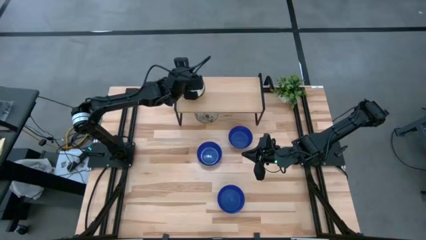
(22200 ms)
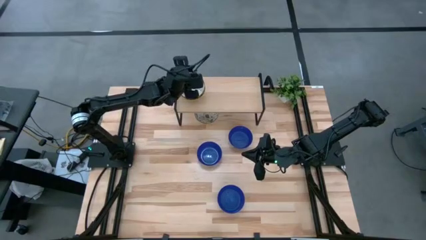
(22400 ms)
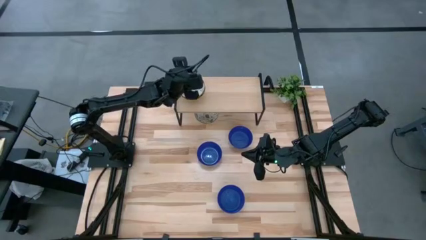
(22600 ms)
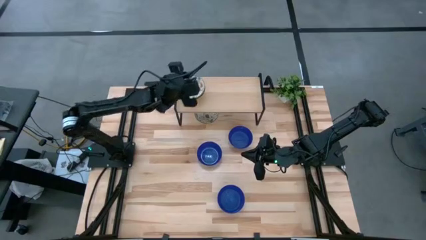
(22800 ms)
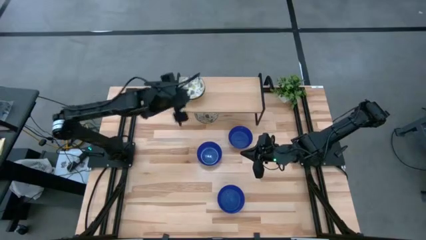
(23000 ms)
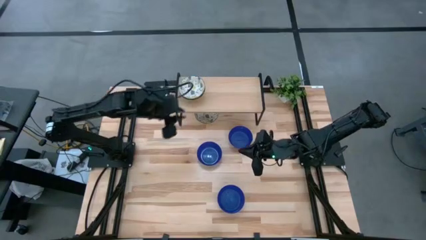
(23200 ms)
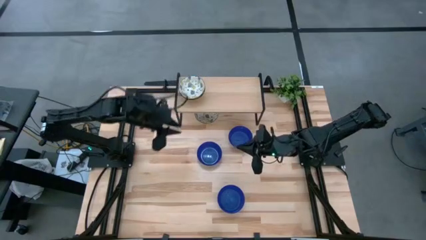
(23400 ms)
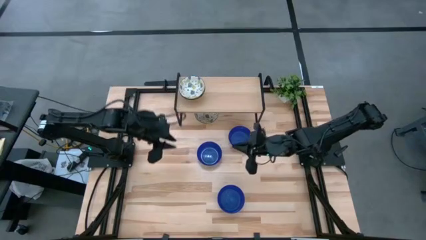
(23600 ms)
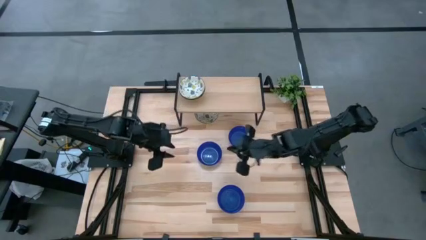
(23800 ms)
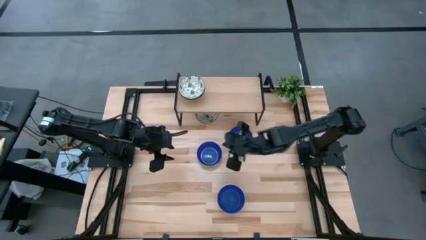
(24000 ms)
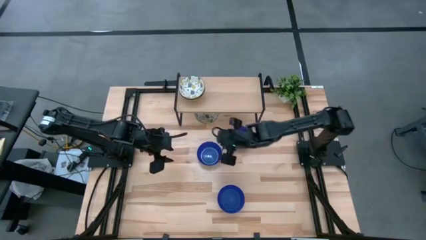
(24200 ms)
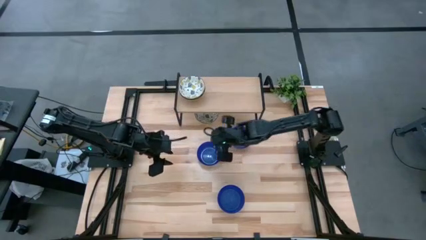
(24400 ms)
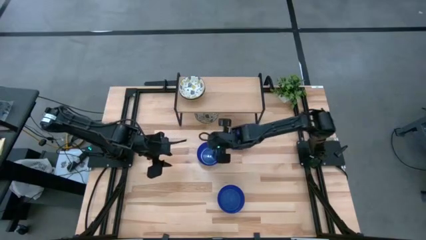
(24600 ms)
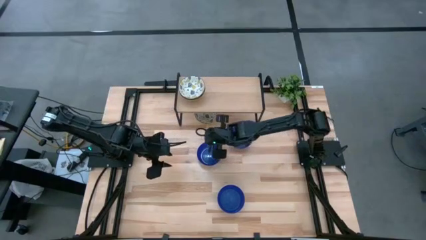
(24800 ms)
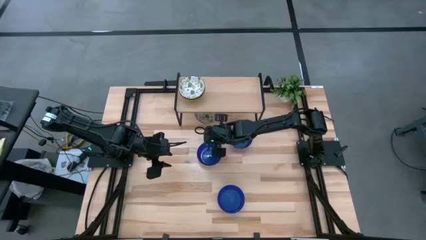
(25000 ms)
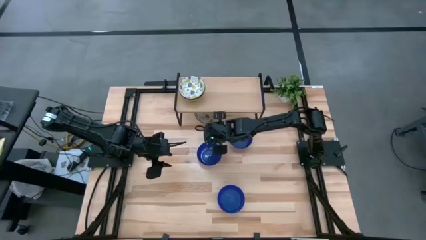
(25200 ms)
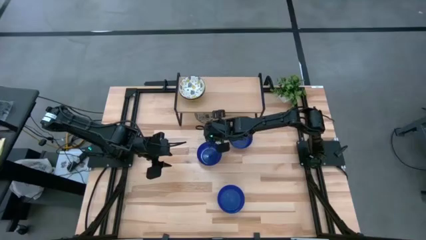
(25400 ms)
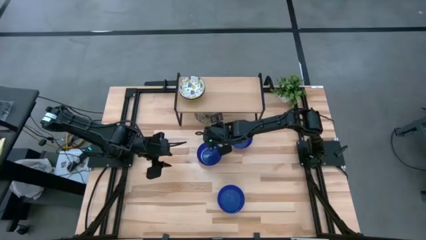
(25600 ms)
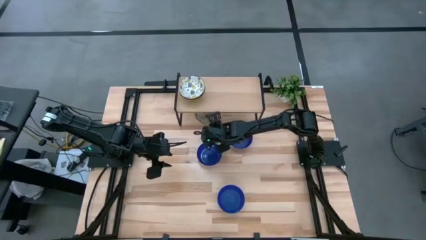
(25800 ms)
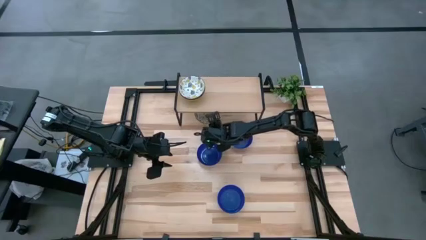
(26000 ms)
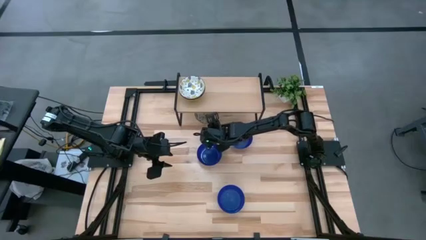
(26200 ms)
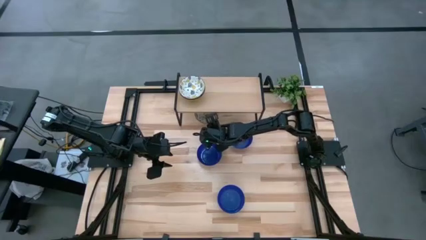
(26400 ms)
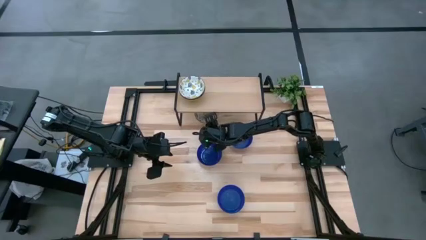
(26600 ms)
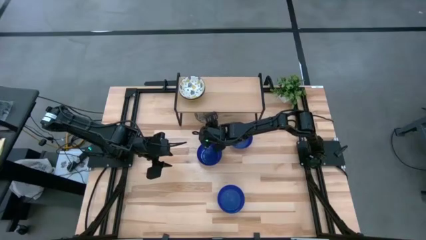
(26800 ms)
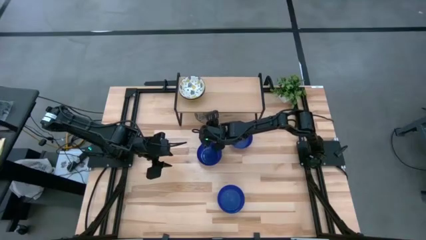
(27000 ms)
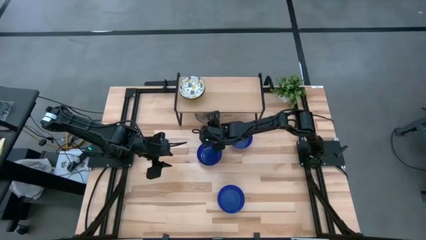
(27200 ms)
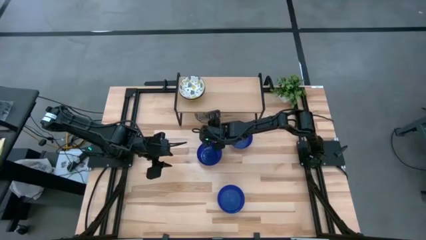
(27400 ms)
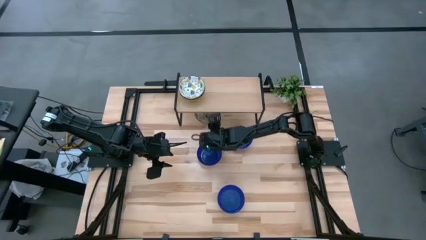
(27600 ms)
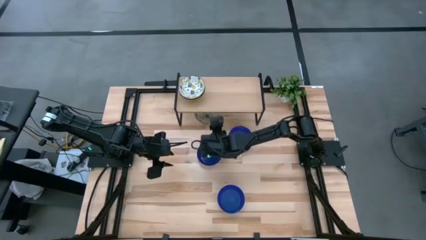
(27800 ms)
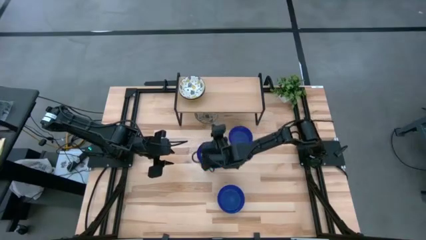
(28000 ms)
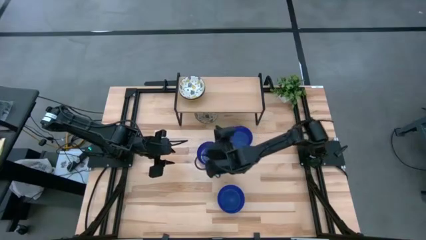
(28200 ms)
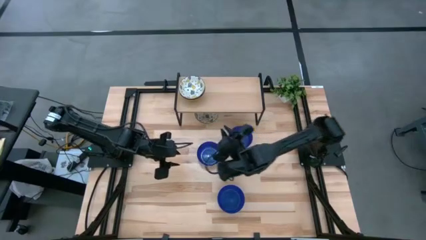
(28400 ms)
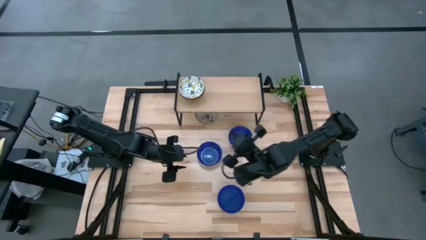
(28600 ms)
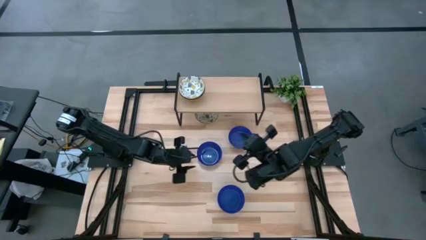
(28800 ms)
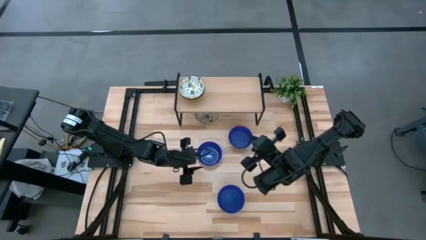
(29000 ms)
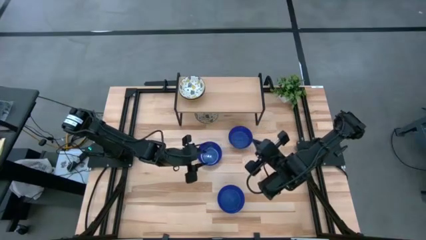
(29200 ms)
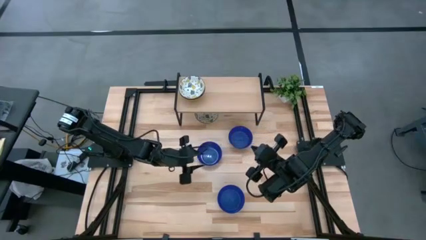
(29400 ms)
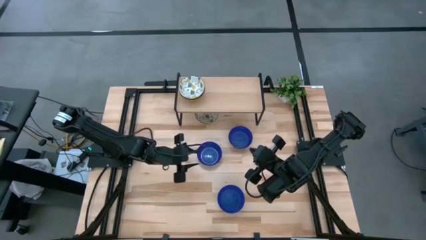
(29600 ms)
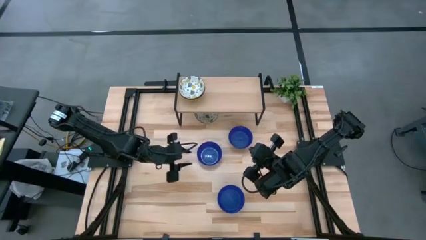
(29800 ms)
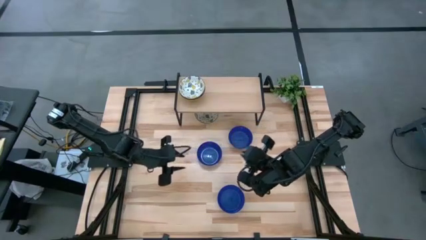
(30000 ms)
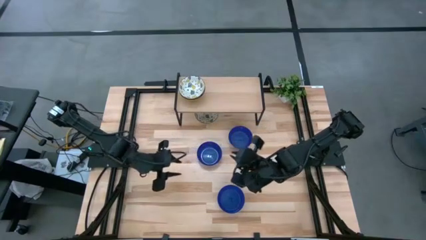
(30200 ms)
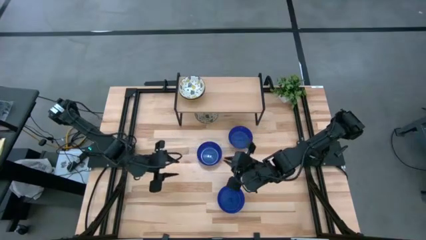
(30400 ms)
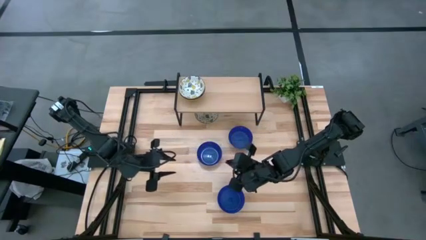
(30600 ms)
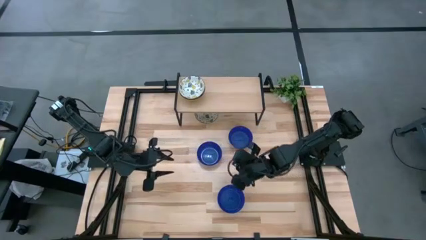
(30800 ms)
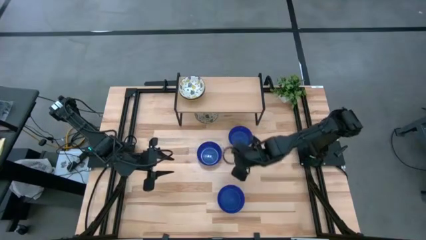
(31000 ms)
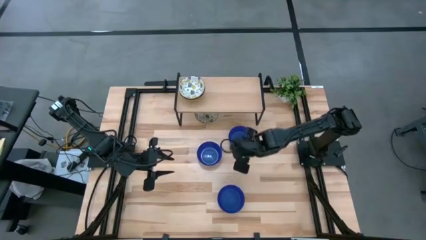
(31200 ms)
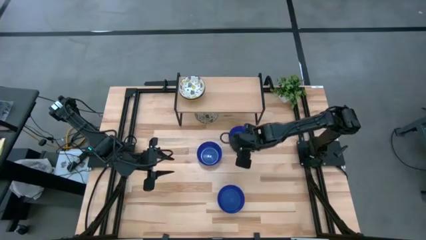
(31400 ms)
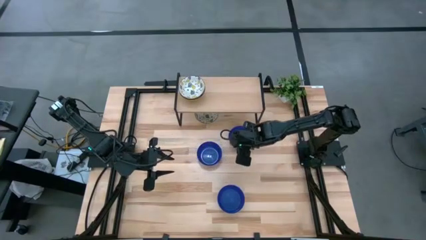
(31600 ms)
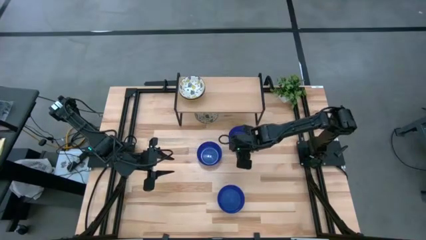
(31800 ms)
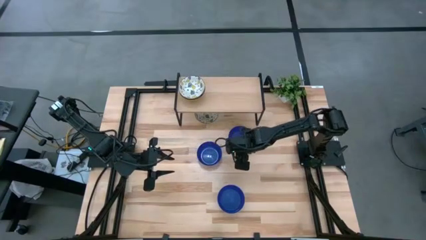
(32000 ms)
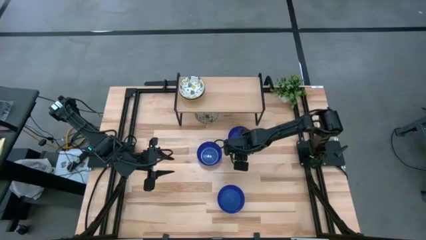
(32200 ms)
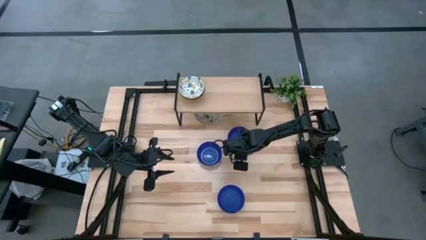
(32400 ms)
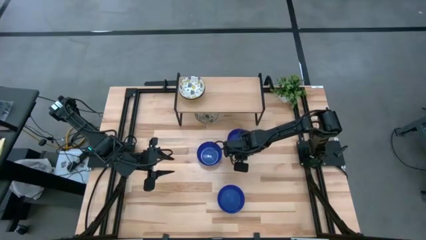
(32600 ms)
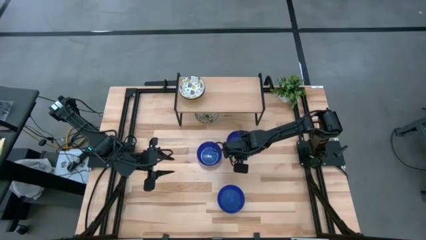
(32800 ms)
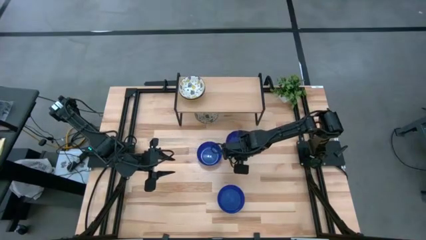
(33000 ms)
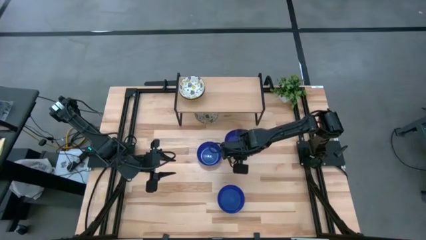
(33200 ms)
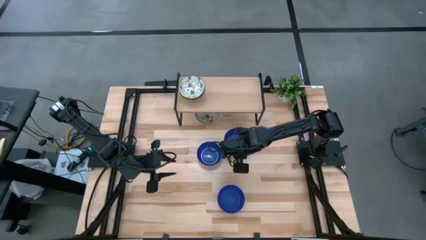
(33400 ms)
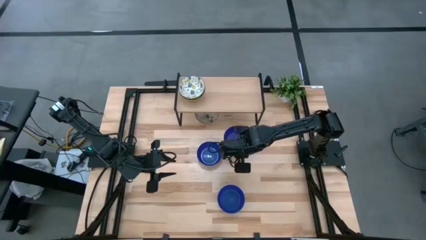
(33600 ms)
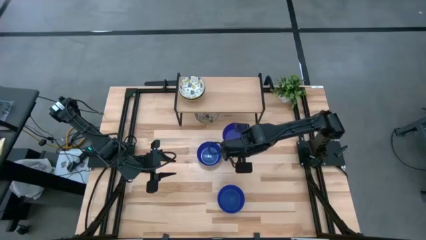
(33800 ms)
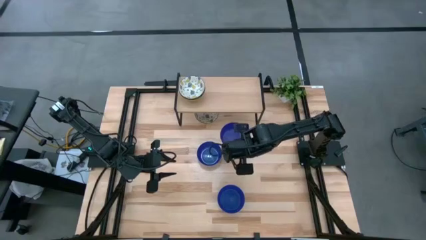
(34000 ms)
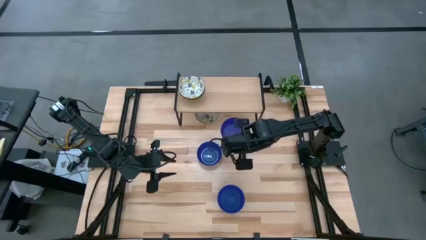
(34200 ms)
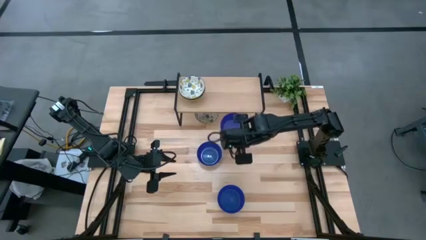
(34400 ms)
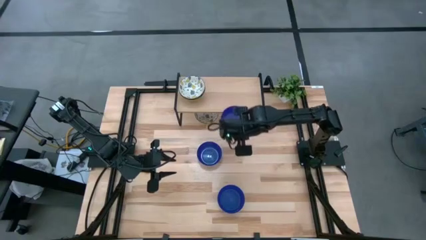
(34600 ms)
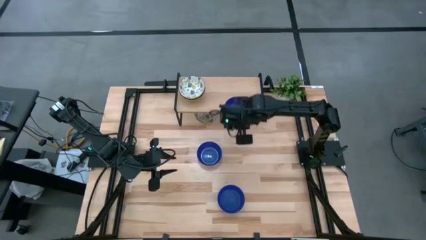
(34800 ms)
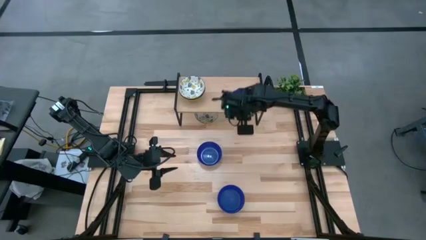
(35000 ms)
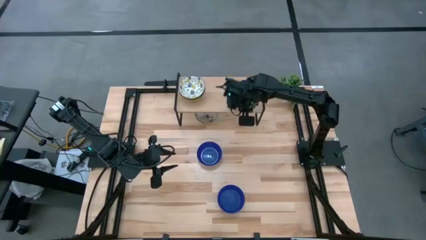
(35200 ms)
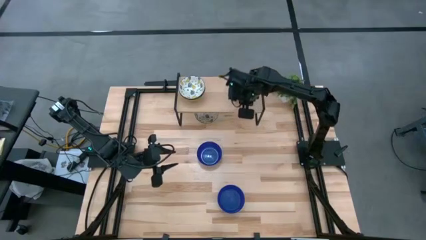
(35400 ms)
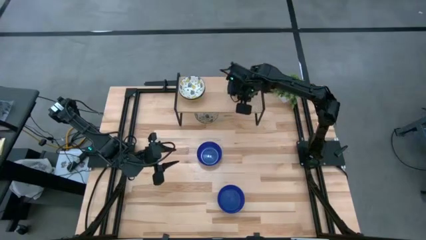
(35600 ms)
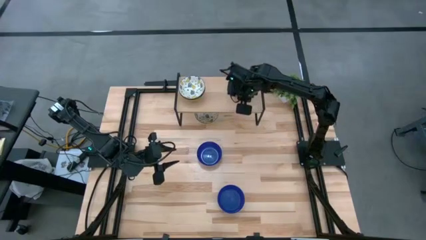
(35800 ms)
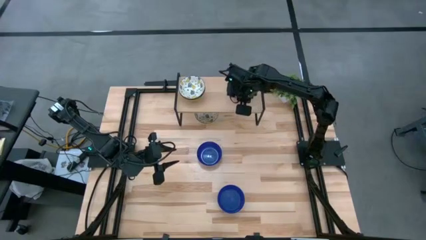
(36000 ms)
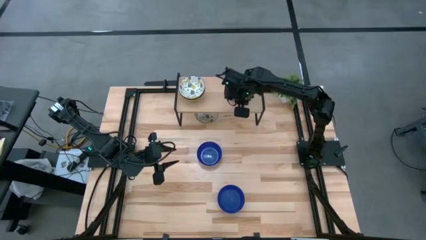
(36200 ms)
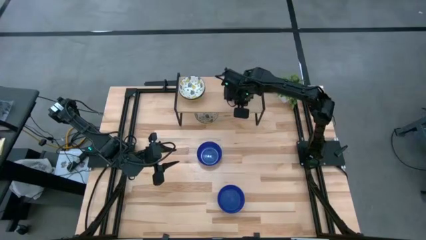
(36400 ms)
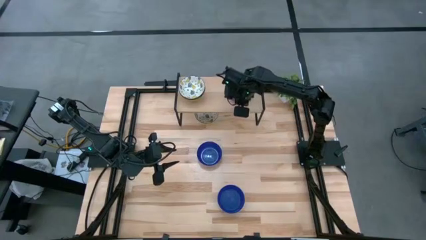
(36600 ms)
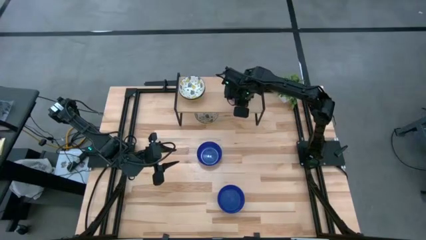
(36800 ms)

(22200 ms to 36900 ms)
Task: Pick & Place Mini bowls
Put the top blue bowl on the shelf

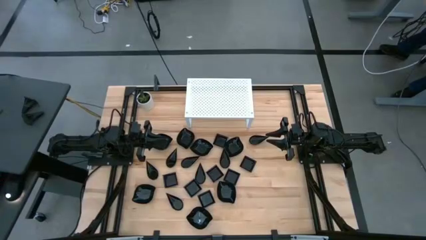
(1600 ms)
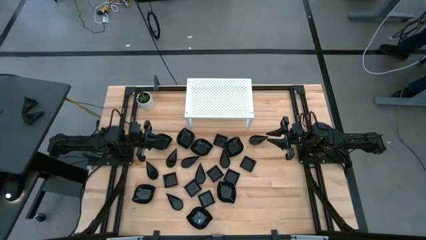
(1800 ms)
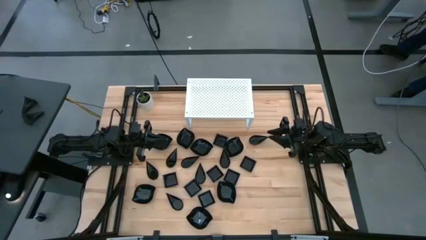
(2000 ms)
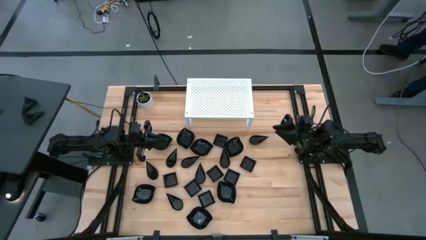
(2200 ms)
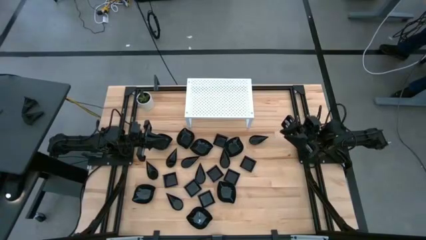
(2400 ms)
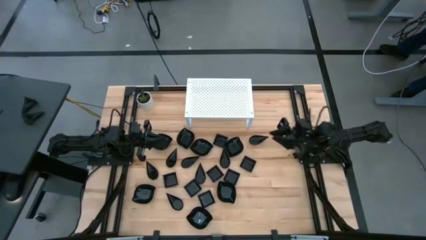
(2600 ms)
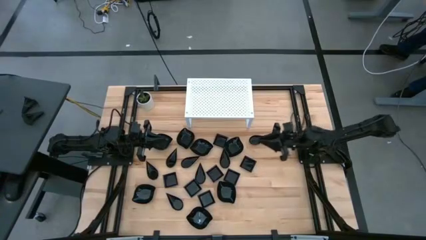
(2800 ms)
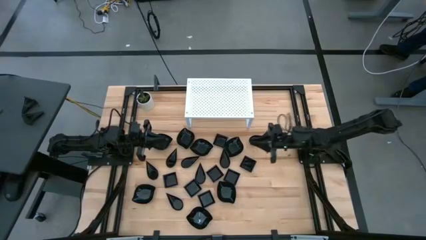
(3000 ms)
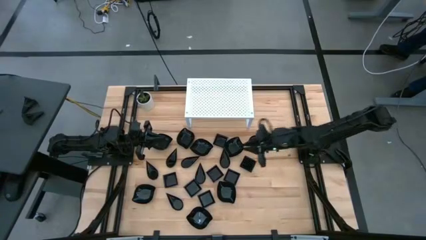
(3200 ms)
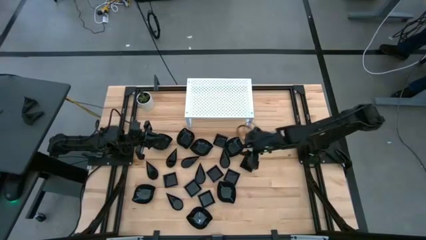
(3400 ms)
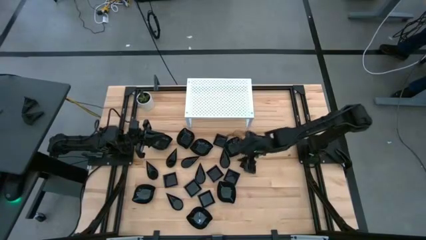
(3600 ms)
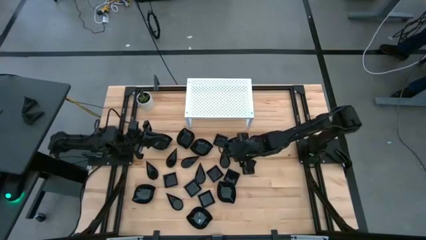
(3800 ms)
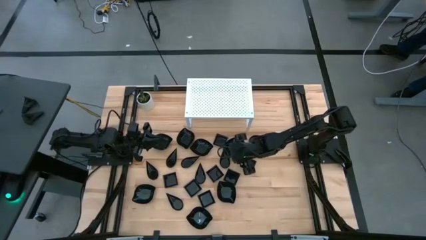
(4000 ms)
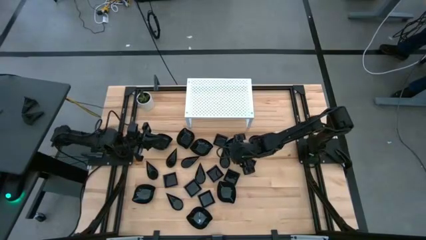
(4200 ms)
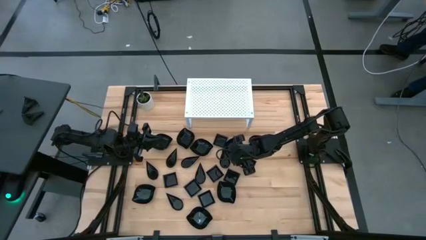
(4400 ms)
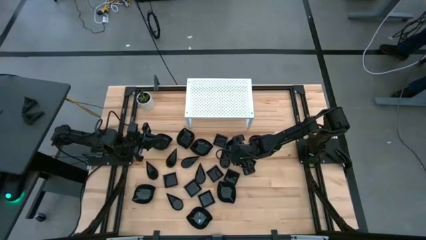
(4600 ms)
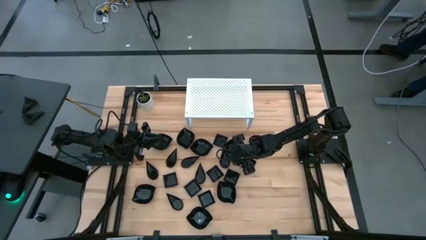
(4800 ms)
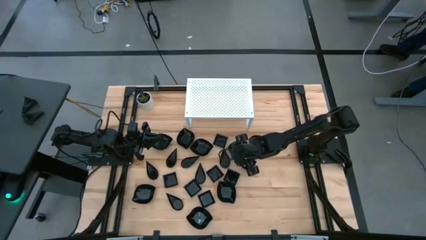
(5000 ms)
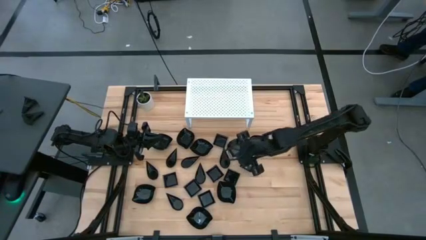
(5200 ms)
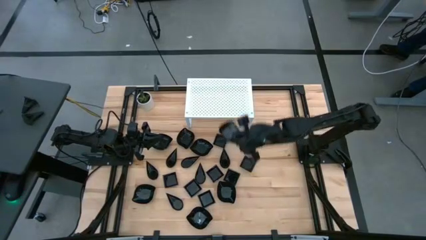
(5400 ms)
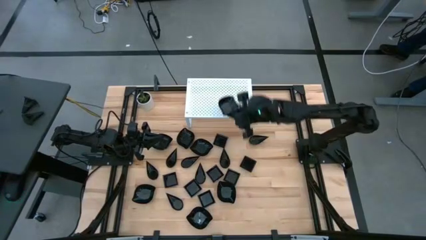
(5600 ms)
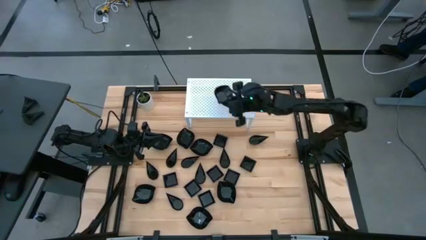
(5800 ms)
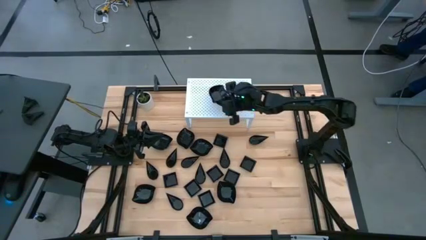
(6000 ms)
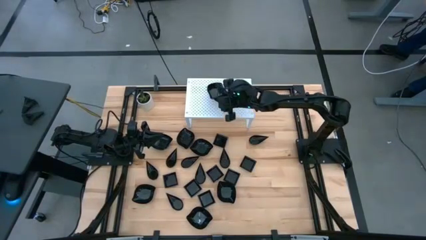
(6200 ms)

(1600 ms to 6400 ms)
Task: Pick & Place Mini shaped plates
Put the black leaf-shaped plate on the shelf
